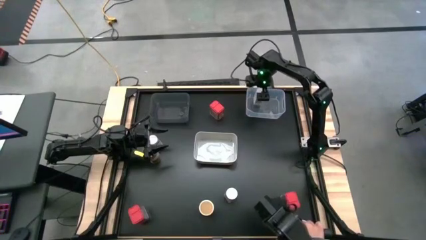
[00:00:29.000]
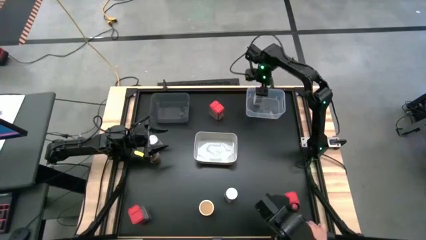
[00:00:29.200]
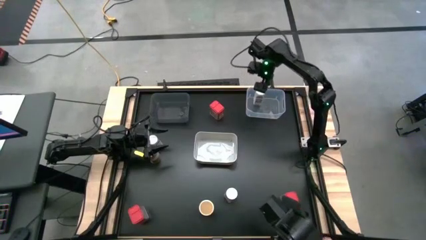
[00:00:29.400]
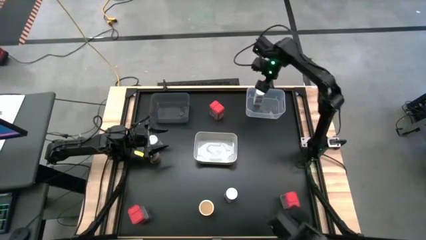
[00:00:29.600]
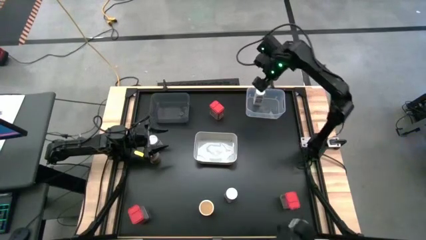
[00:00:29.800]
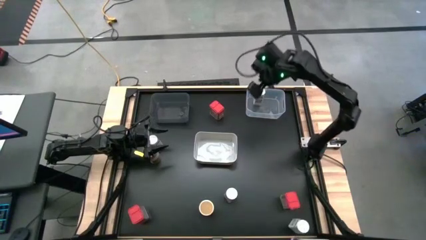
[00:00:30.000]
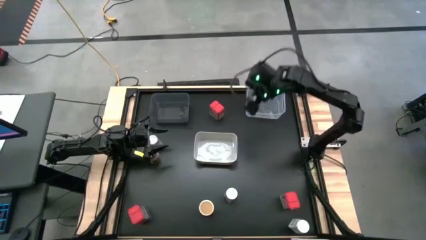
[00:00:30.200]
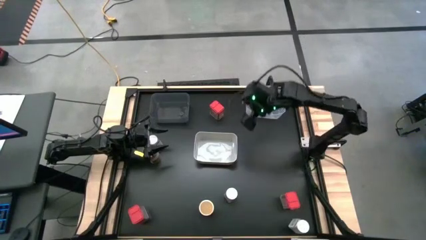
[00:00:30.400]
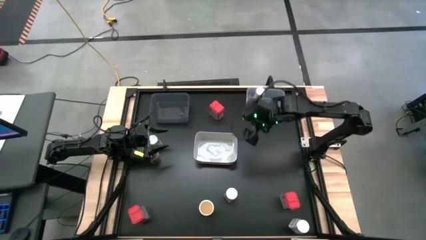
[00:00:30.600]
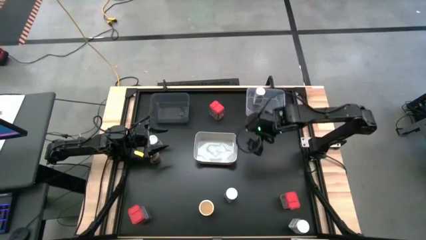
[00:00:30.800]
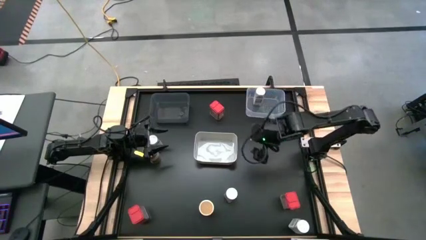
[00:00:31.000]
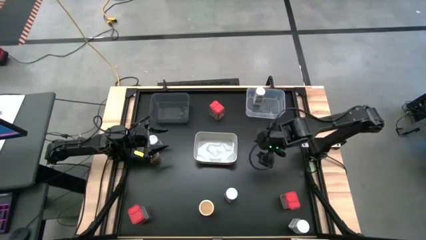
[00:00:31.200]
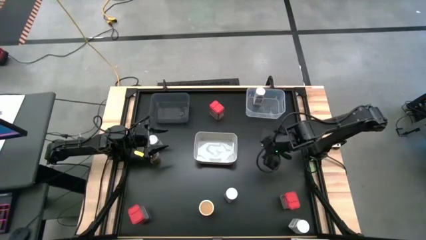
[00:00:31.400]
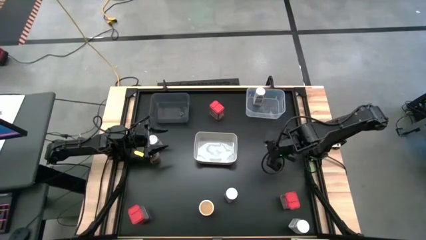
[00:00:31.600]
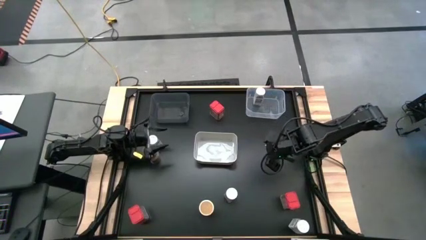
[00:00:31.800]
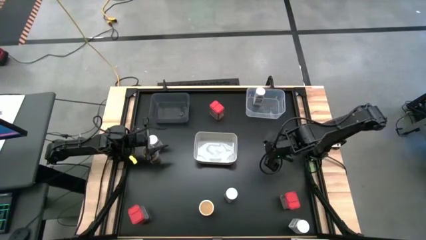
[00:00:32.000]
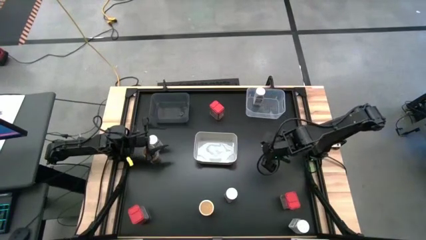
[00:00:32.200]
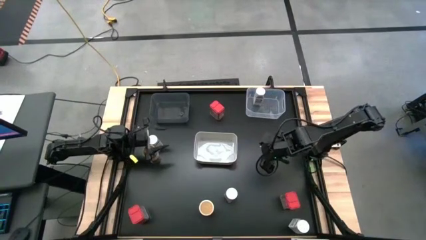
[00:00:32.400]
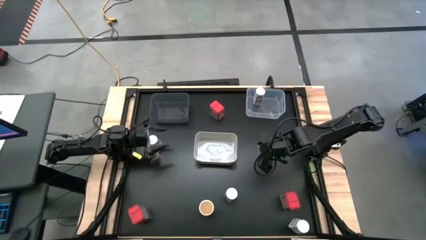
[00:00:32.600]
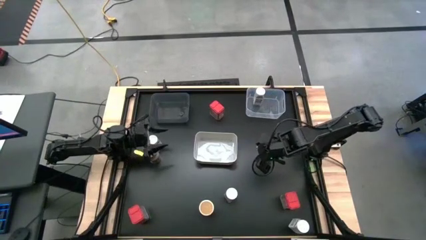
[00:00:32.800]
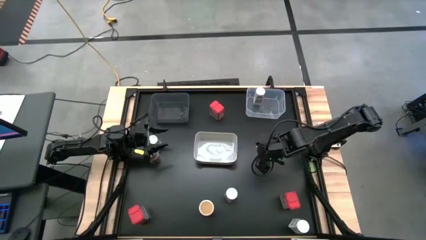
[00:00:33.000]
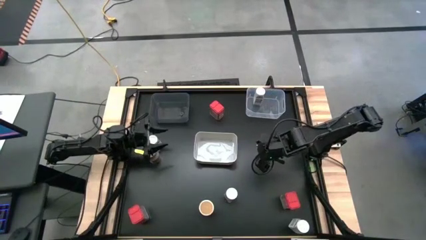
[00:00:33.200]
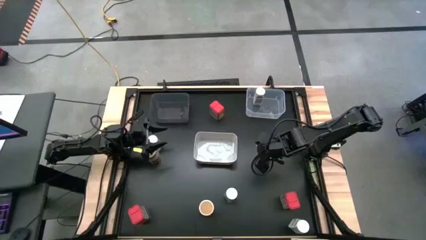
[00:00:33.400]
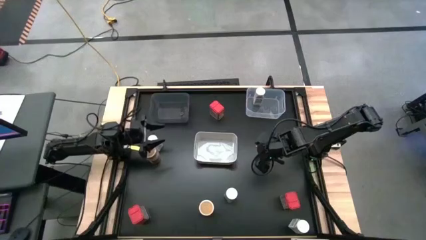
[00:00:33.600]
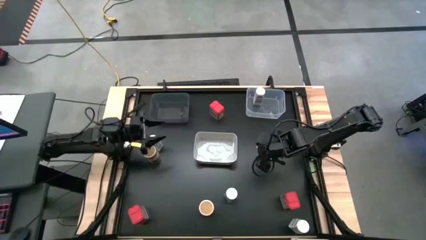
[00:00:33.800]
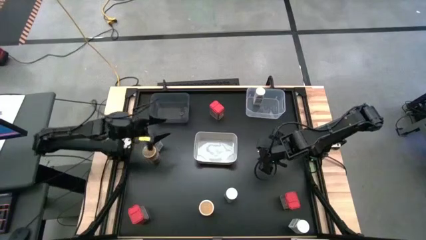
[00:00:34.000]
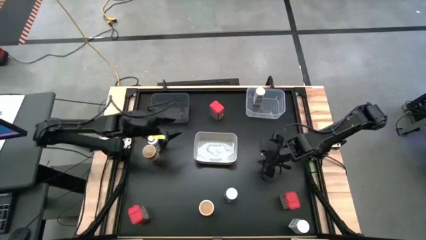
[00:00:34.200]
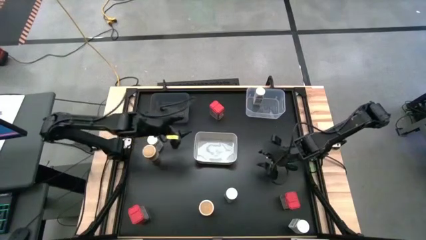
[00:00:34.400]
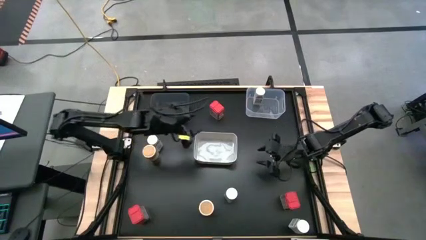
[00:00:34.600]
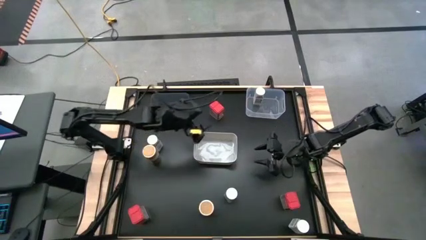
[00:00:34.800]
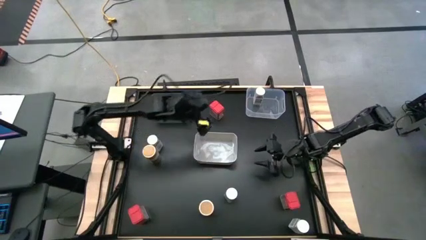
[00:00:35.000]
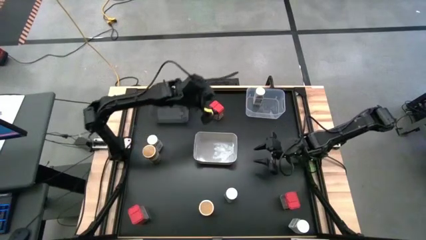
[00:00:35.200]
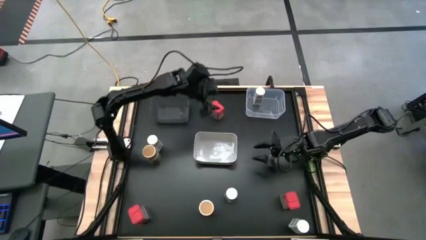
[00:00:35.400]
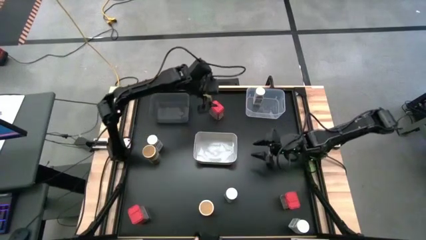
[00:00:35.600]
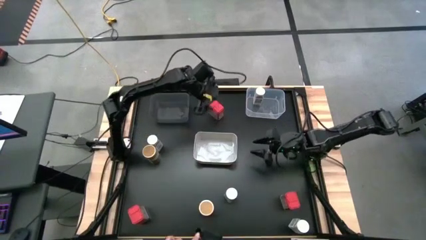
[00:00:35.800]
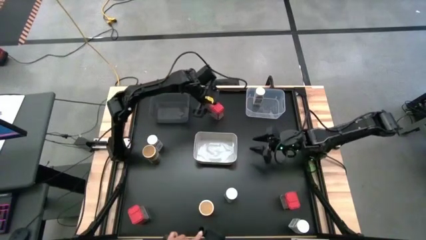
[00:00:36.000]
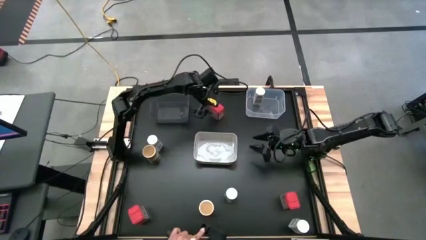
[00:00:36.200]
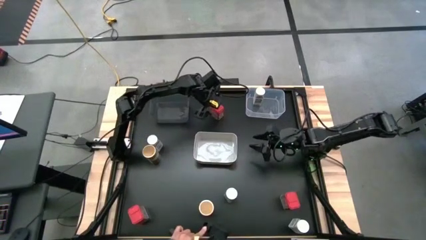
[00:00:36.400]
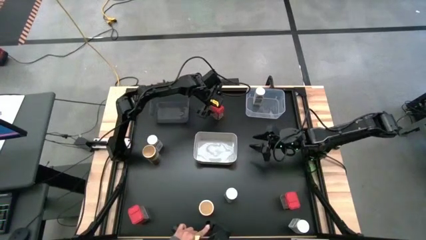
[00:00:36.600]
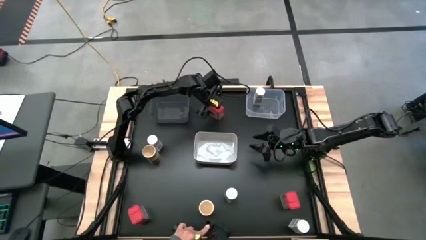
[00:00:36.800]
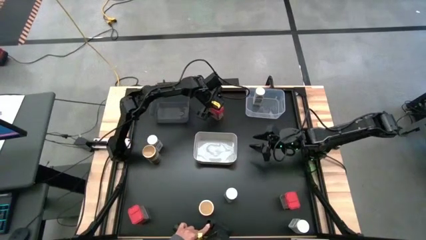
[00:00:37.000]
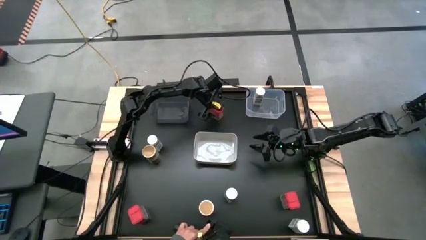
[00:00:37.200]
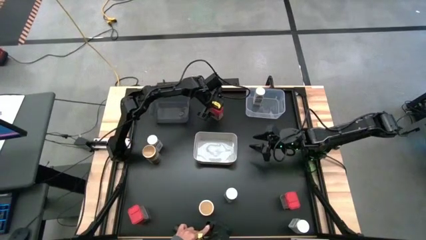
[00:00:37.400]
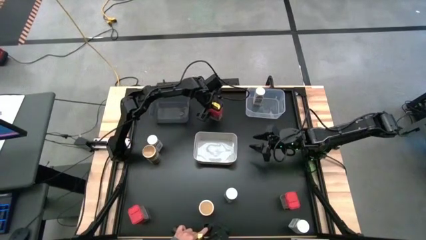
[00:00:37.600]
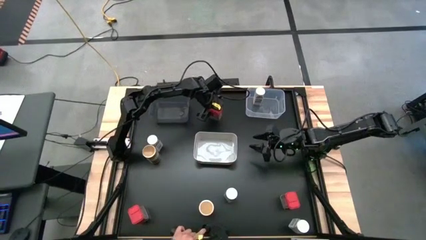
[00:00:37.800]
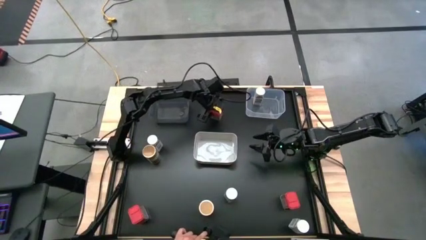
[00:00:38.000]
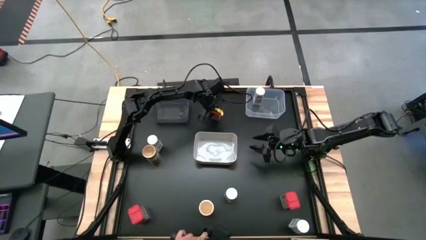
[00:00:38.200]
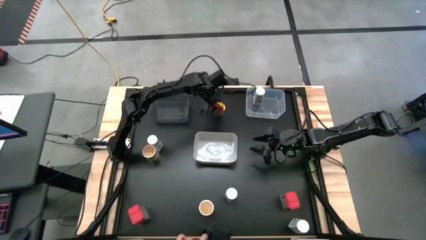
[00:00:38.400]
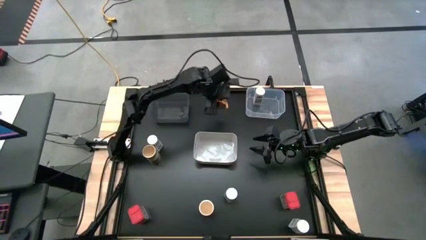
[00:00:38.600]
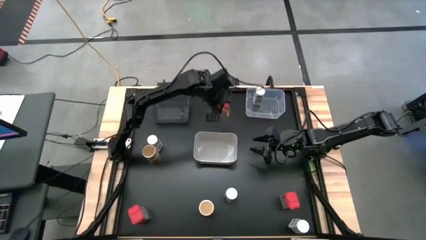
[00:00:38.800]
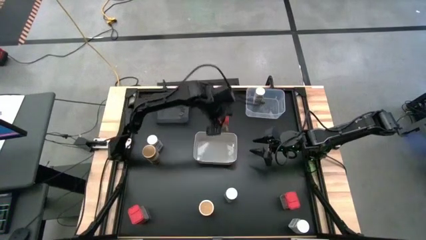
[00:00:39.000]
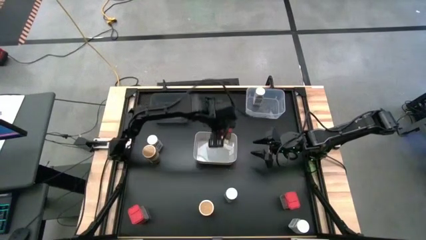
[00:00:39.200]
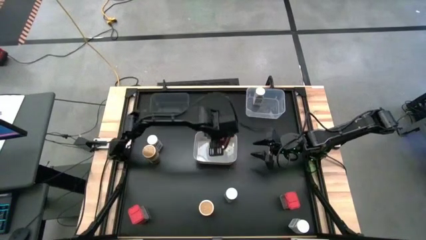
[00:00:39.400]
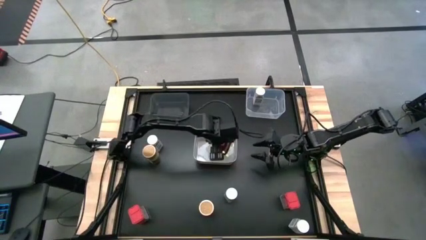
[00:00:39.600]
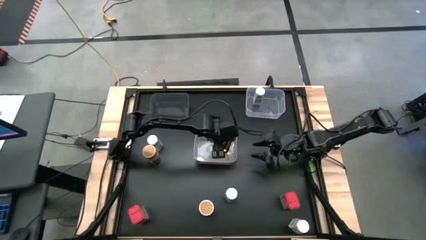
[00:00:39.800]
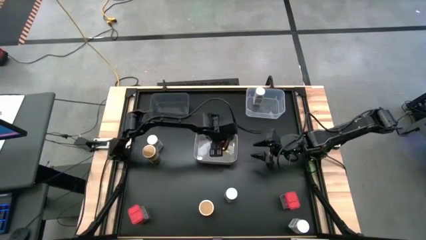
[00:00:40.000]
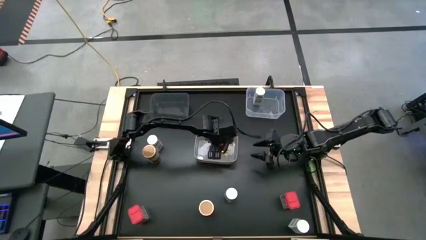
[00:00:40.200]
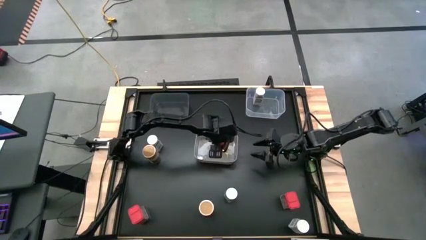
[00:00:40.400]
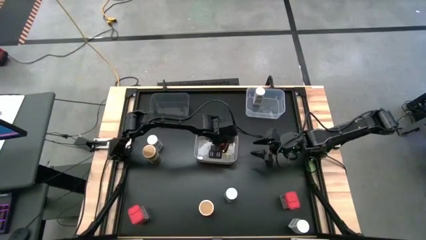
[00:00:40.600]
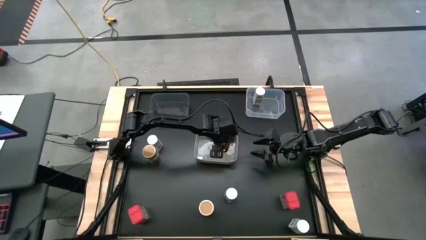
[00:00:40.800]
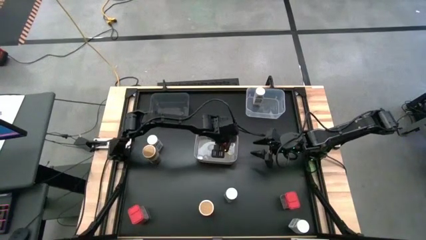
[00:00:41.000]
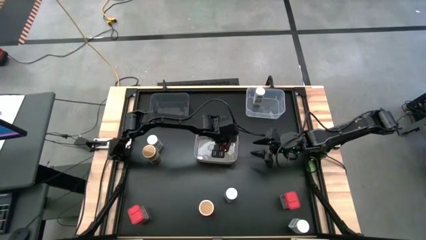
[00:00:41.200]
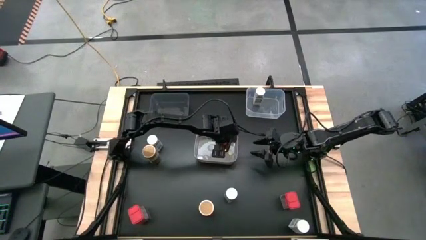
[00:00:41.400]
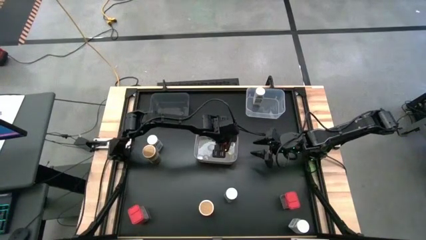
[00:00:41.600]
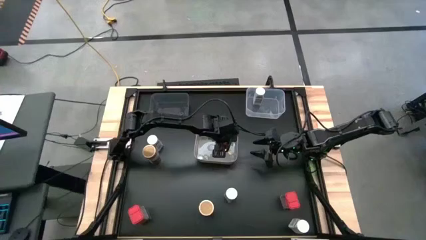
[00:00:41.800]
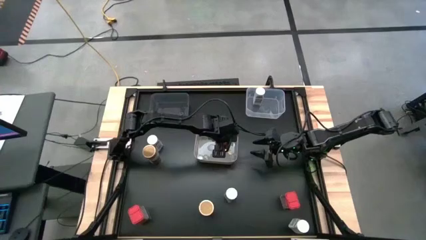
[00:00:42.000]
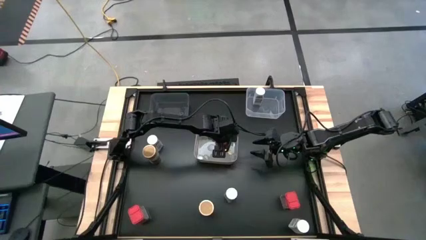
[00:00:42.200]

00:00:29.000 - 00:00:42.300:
Task: Sort spices by type
Put the red seasoning can into the gray bin

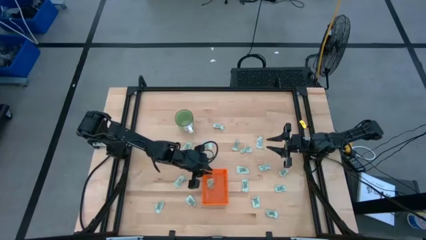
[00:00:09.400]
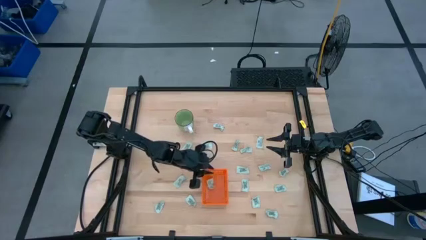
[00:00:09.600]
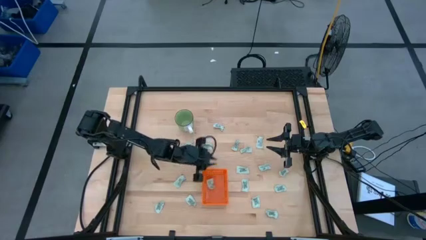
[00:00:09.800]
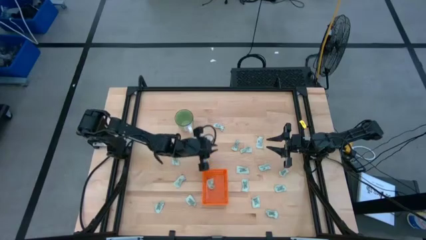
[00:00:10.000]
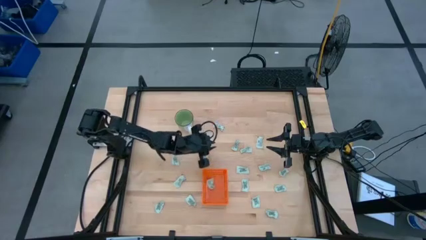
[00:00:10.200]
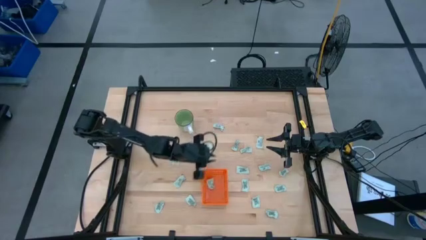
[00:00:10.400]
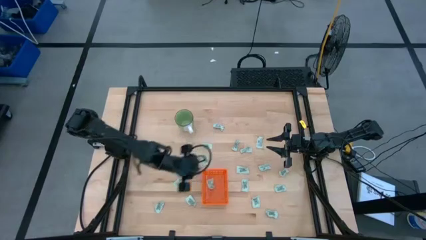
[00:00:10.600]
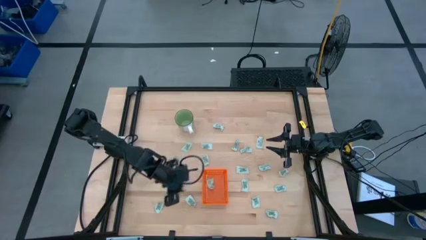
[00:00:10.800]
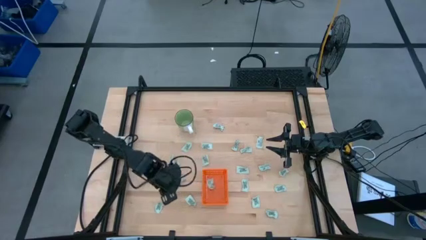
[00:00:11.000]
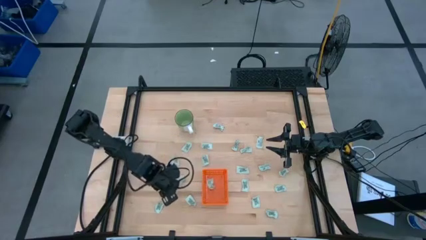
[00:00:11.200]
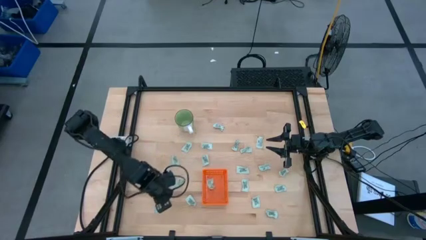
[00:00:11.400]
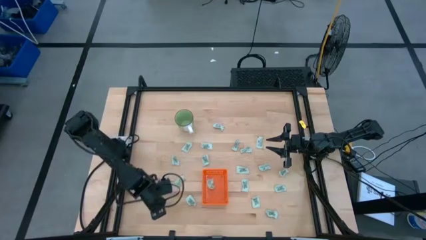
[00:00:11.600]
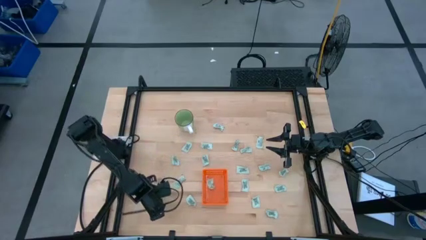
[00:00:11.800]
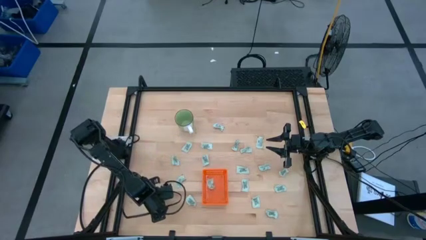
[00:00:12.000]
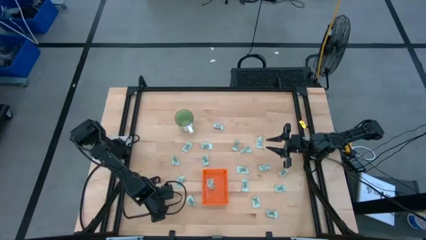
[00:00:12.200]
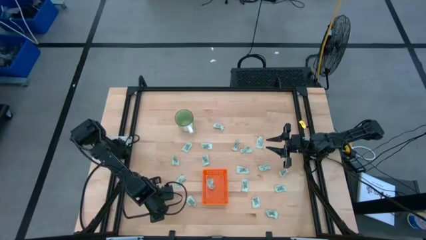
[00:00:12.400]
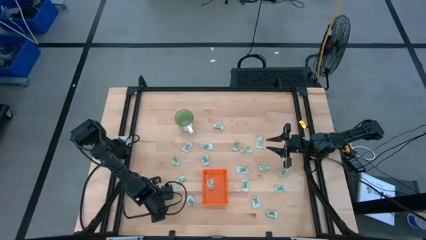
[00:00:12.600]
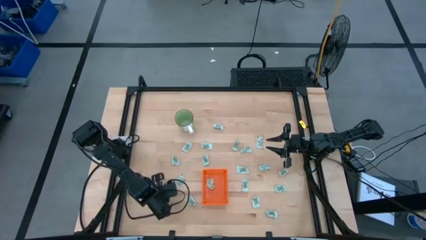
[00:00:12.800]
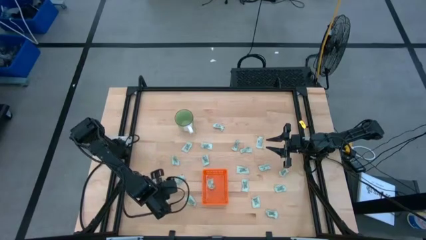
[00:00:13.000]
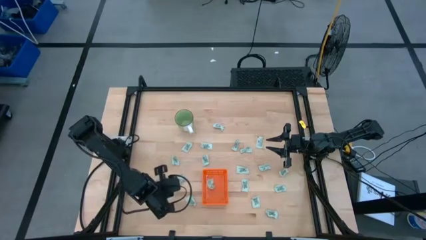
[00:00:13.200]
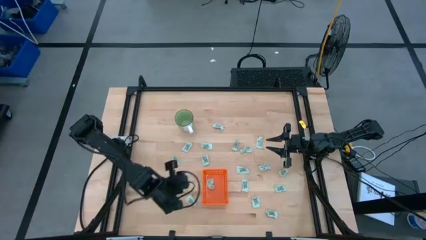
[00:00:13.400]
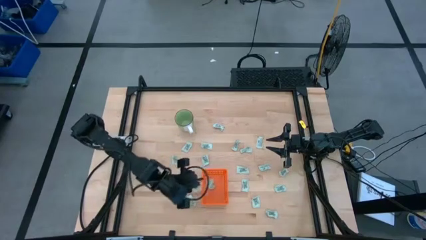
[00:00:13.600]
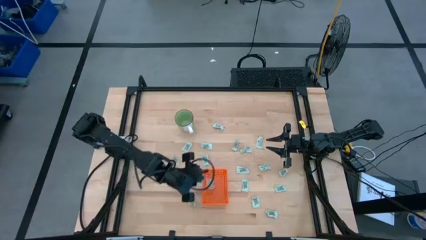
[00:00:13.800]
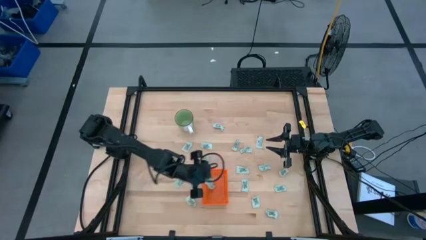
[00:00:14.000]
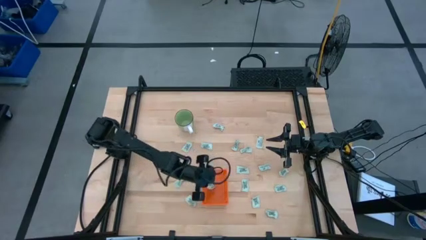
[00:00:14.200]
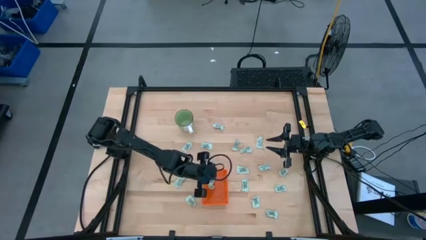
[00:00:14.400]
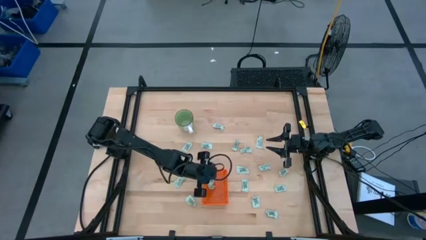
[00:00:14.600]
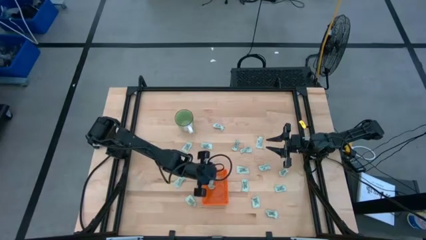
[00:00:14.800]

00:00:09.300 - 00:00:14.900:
Task: Pick and place Stevia / Truvia into bins
Put the stevia packet into the orange basket
